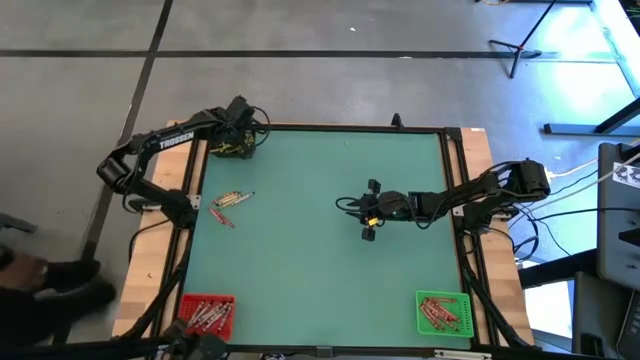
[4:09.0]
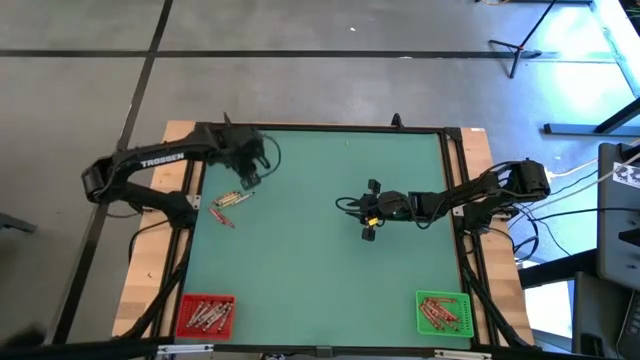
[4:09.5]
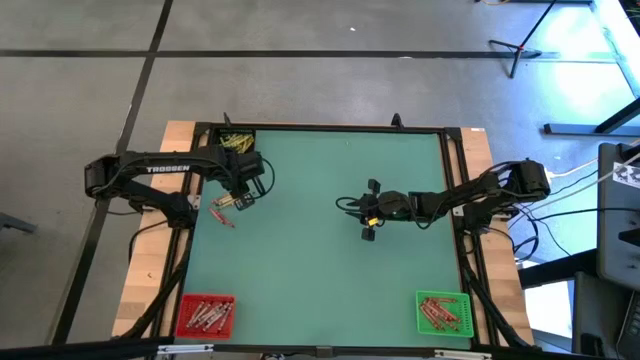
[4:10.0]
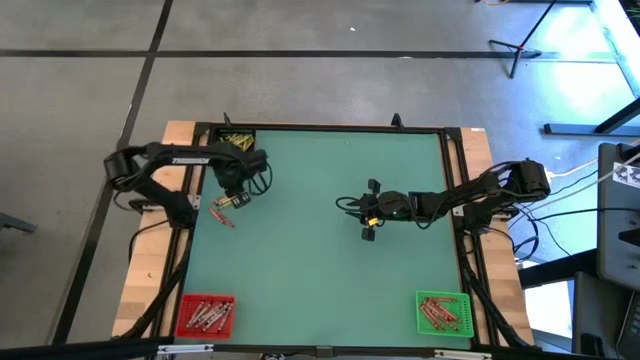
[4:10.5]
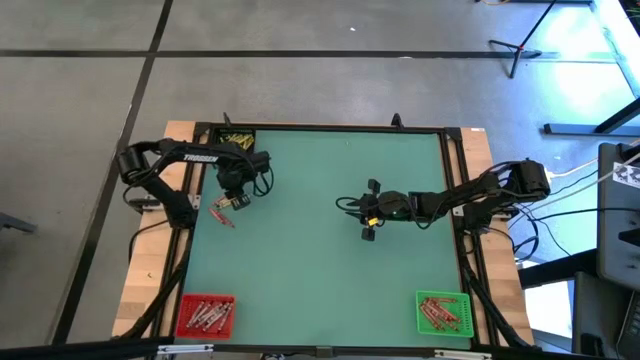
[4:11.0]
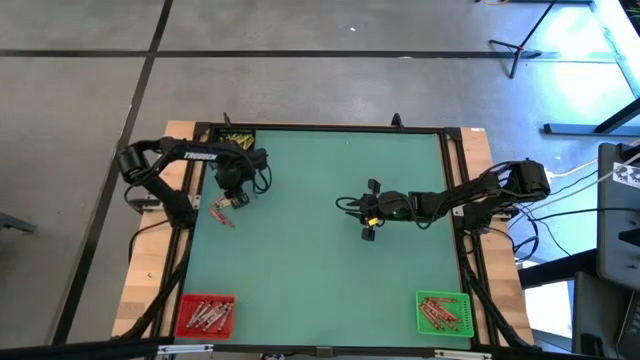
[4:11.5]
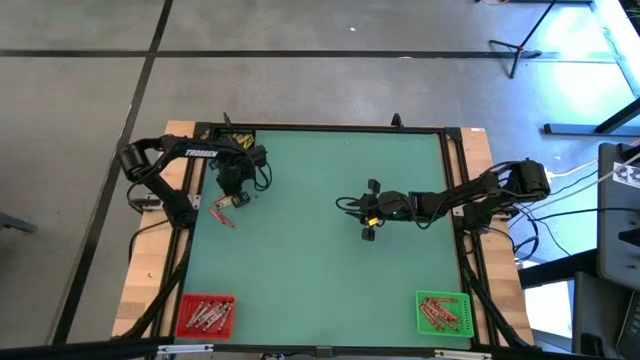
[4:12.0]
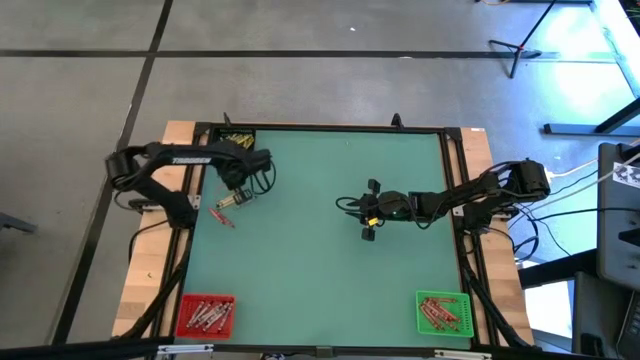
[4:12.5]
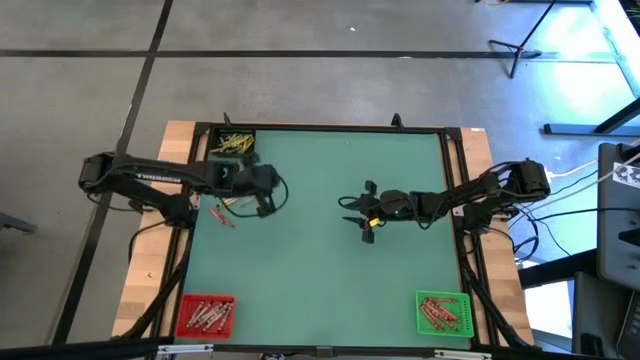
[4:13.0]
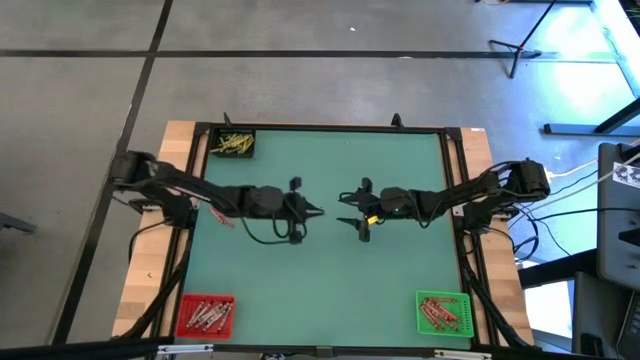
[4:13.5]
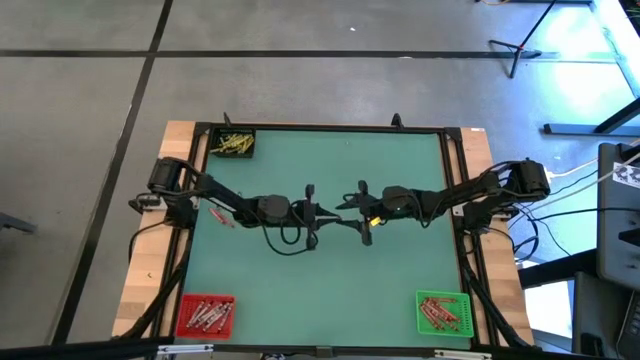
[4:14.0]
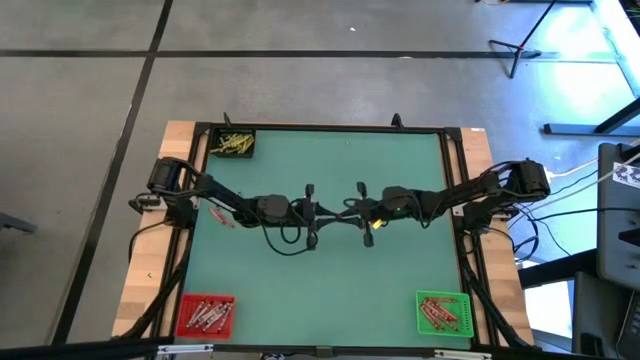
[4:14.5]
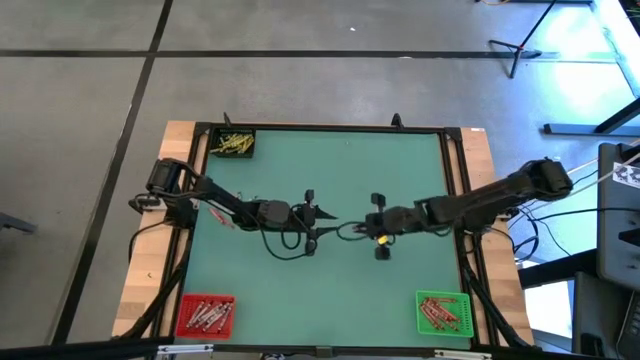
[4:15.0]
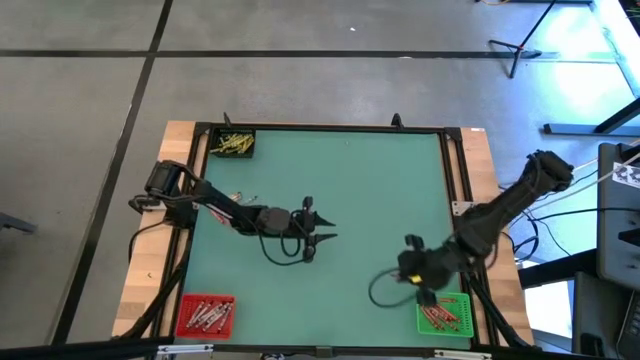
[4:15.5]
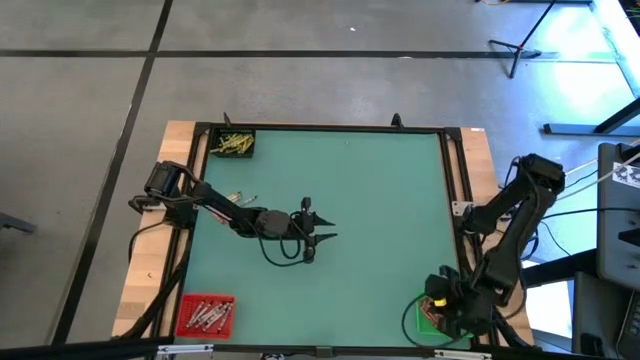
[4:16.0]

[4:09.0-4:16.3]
Task: Sort crayons
Put the top red crayon into the green bin

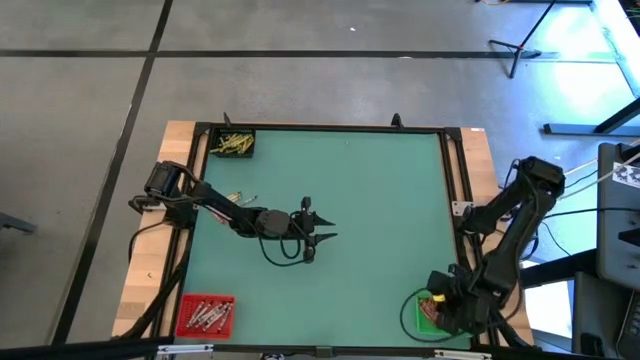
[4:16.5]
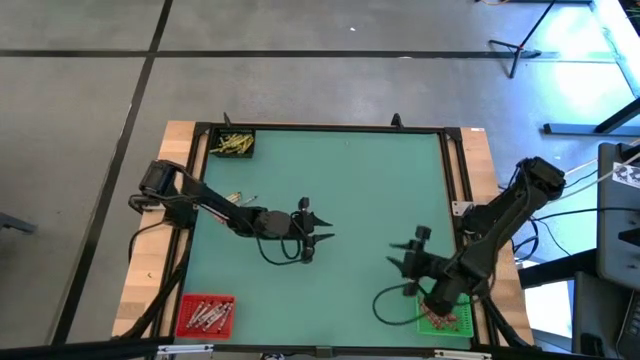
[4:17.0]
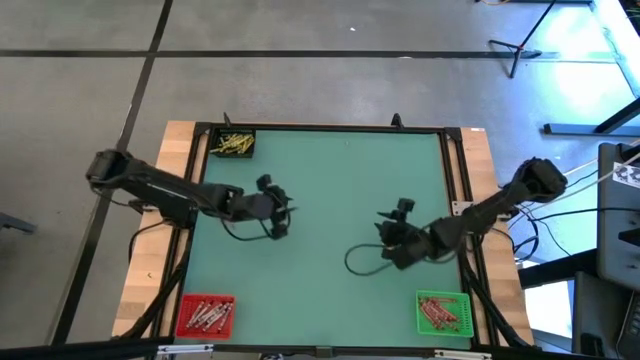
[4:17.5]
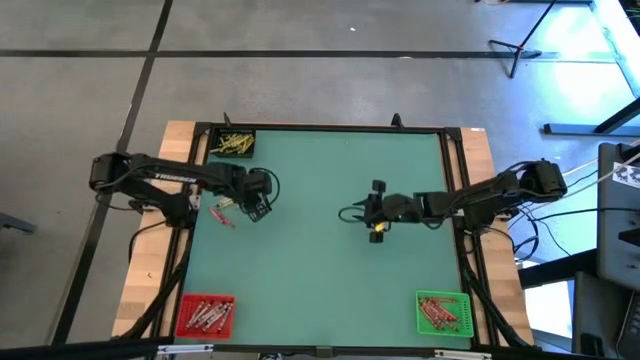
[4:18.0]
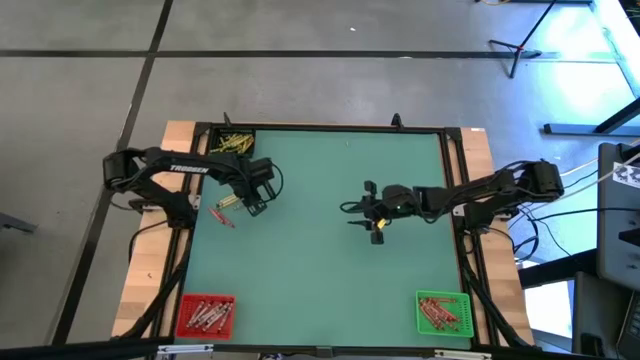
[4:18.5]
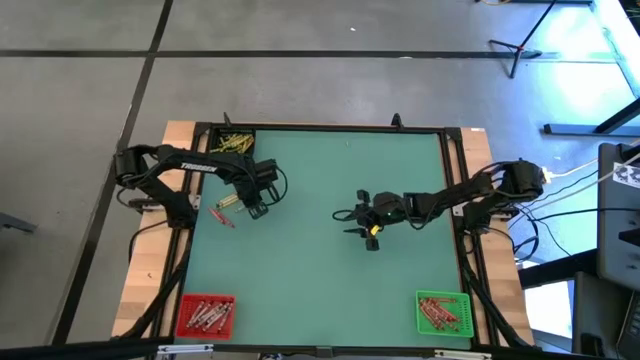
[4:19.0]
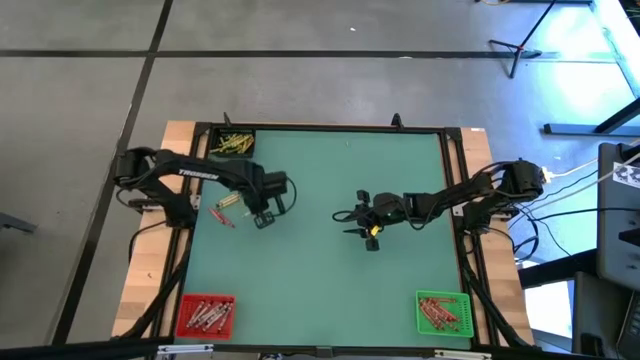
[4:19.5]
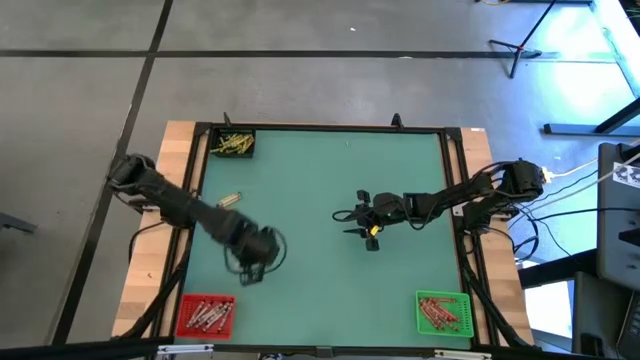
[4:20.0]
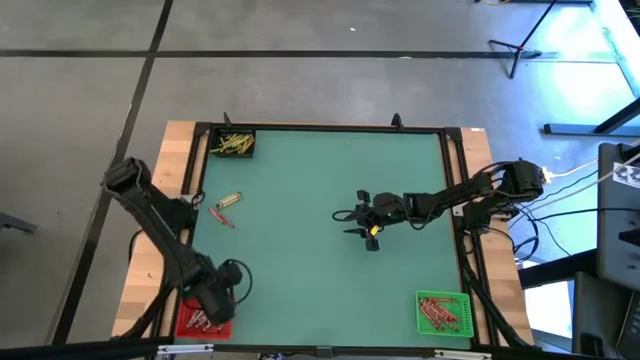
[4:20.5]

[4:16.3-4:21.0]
Put the bottom black crayon into the red bin

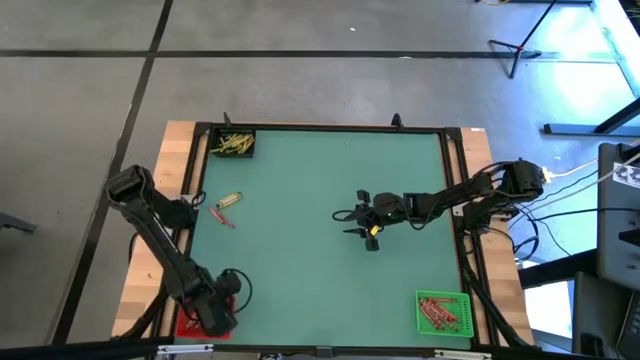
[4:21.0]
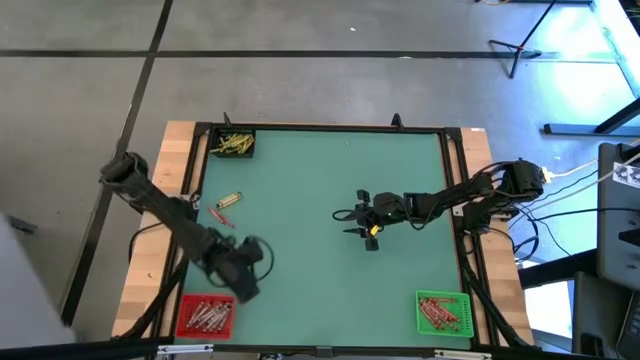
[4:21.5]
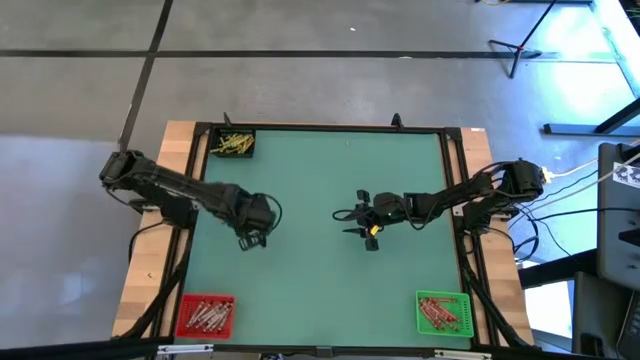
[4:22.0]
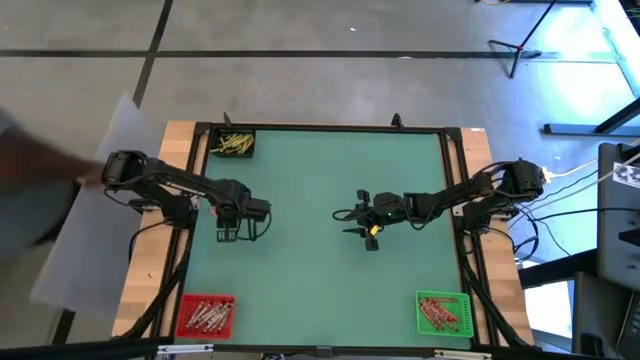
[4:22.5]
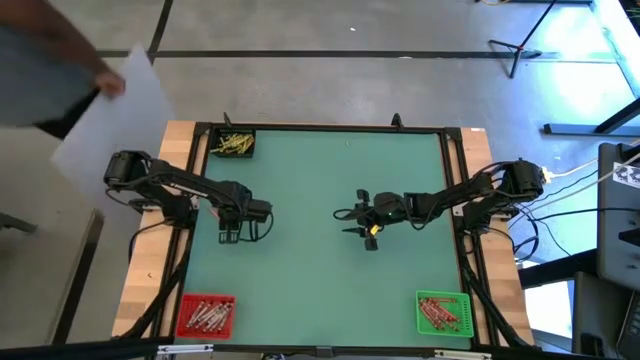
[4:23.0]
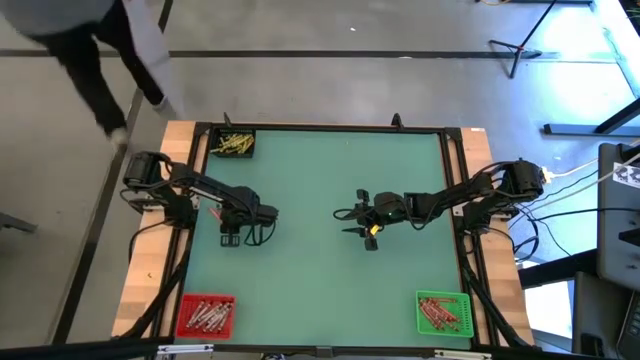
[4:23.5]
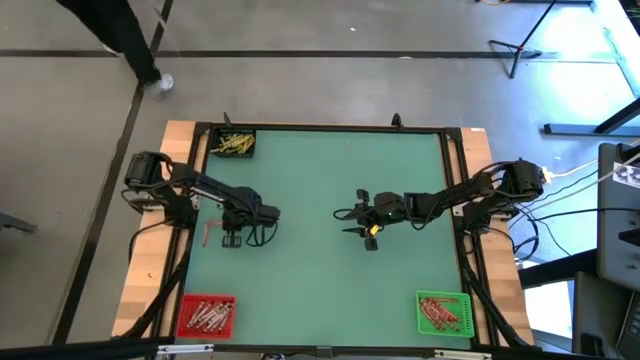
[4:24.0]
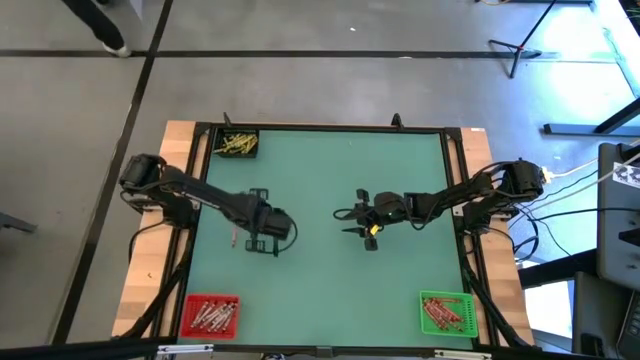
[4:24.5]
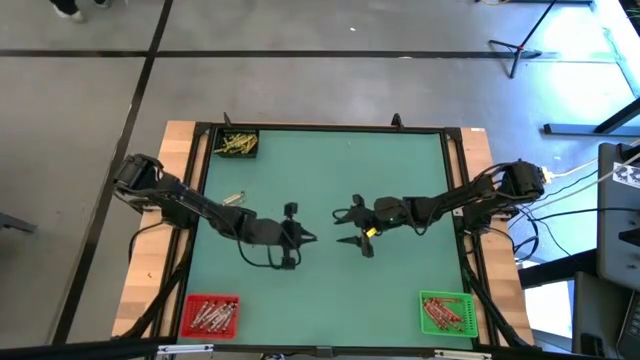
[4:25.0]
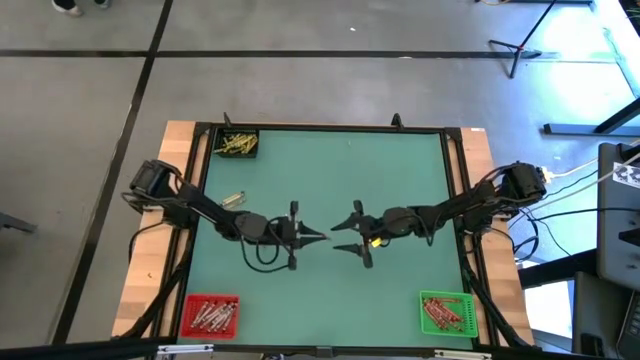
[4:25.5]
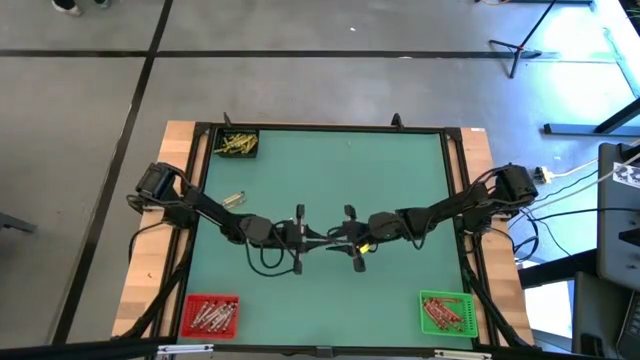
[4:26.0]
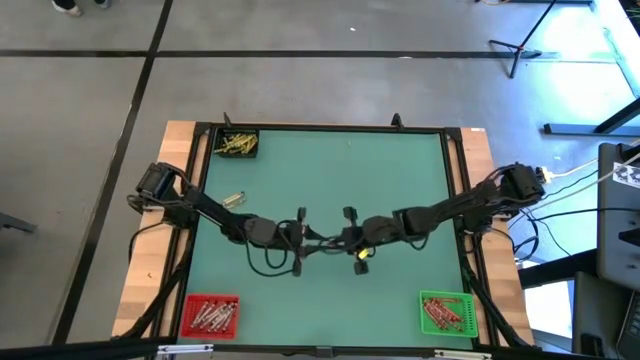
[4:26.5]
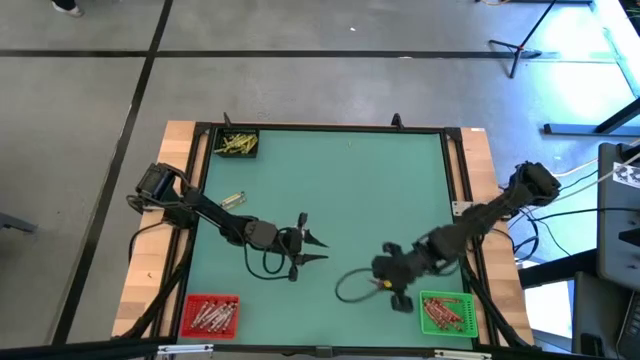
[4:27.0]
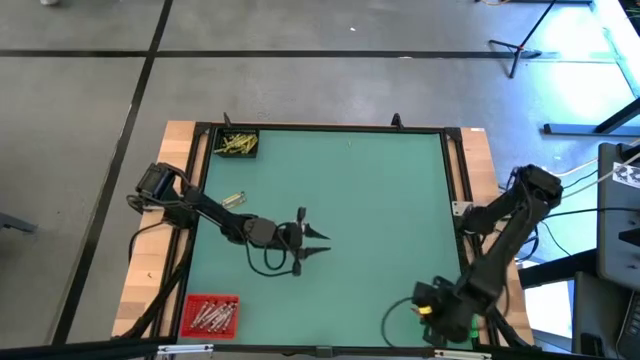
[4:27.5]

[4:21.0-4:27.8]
Put the right red crayon into the green bin

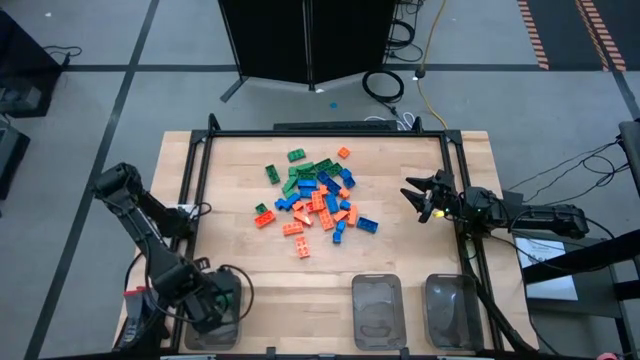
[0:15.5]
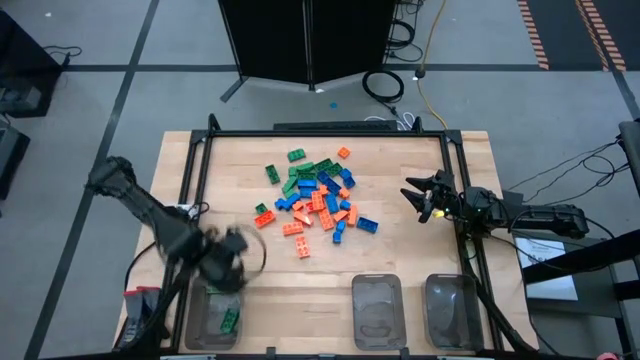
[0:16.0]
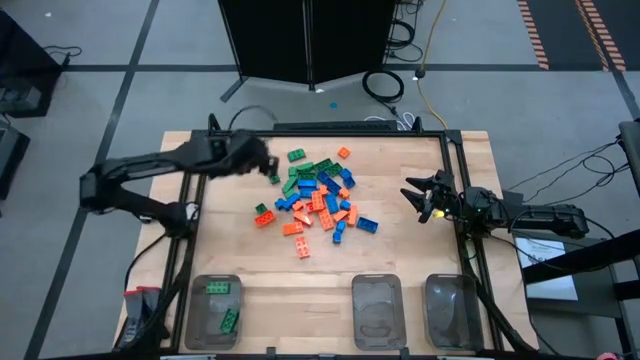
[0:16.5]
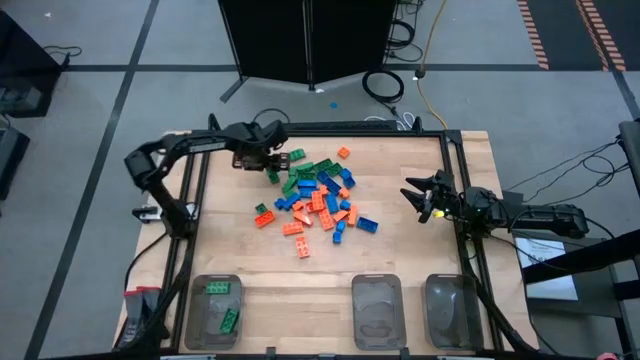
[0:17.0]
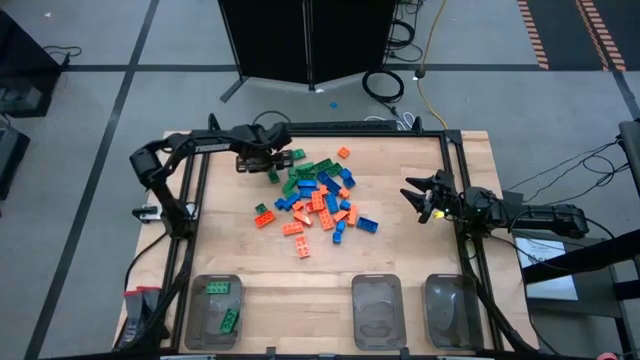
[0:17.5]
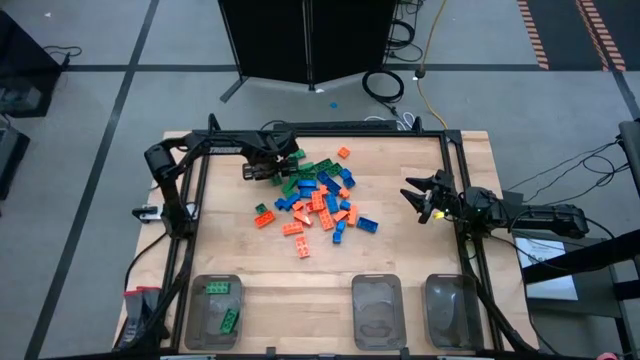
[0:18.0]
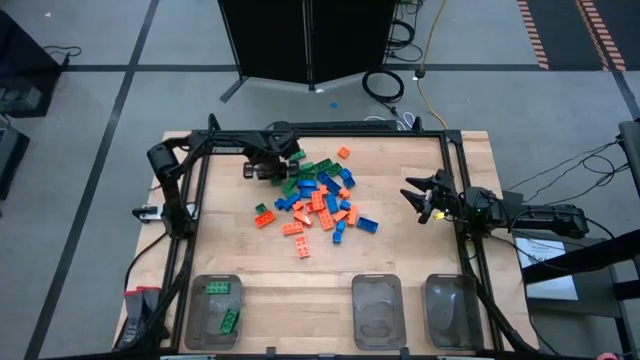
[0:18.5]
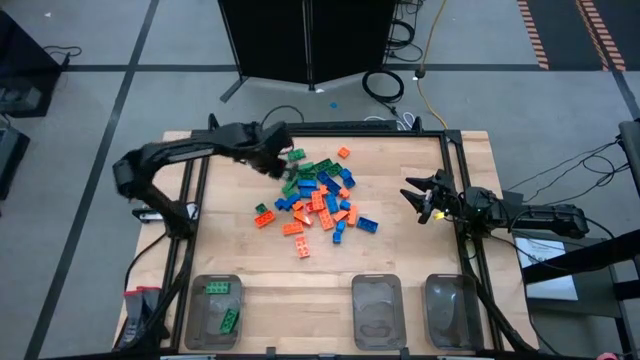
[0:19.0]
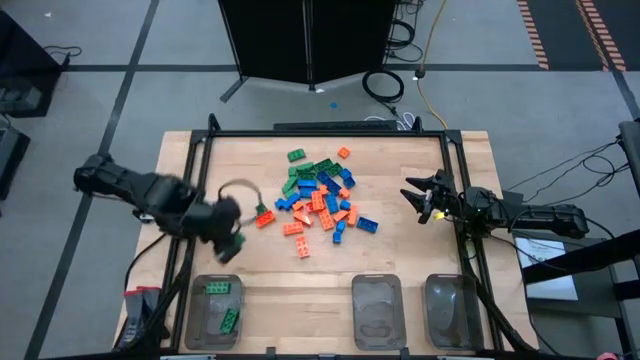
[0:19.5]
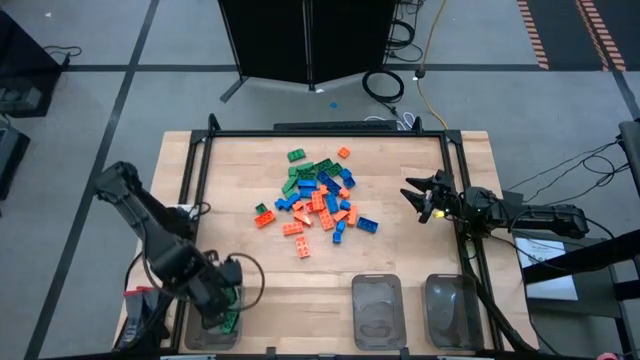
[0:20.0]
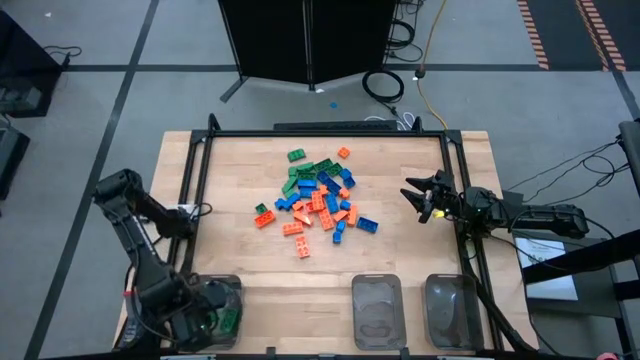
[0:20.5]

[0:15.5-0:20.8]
Task: Sort blocks
Put the green game piece into the left black bin
